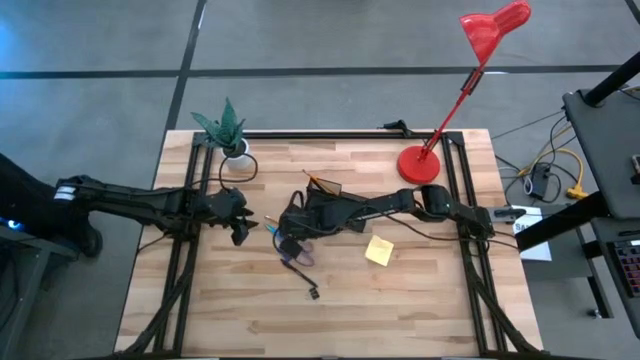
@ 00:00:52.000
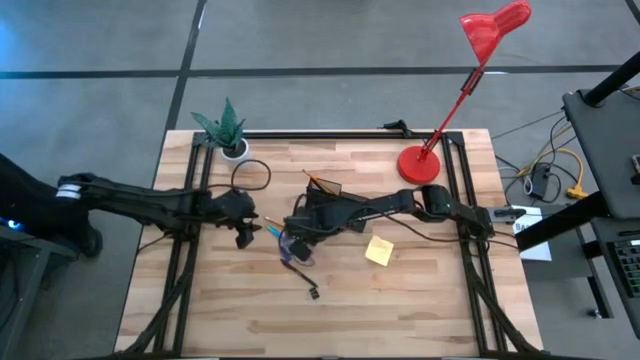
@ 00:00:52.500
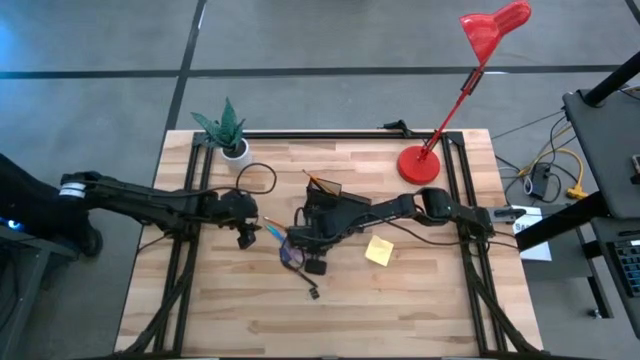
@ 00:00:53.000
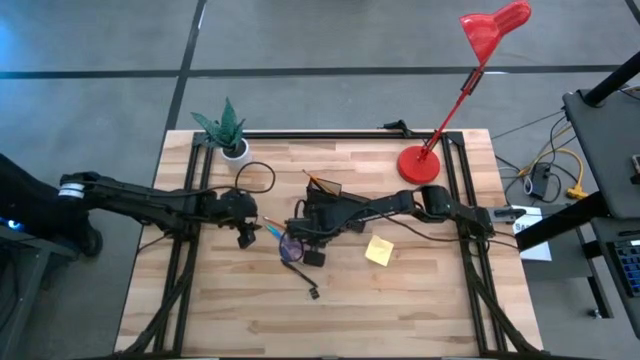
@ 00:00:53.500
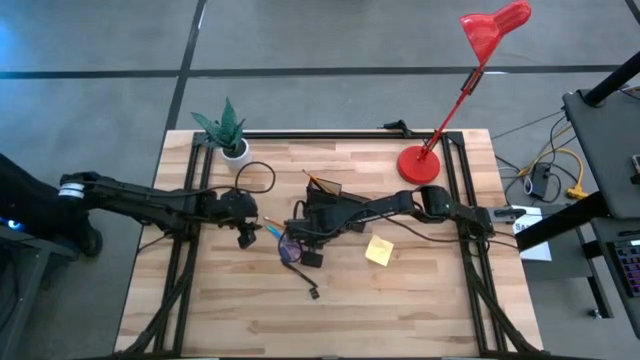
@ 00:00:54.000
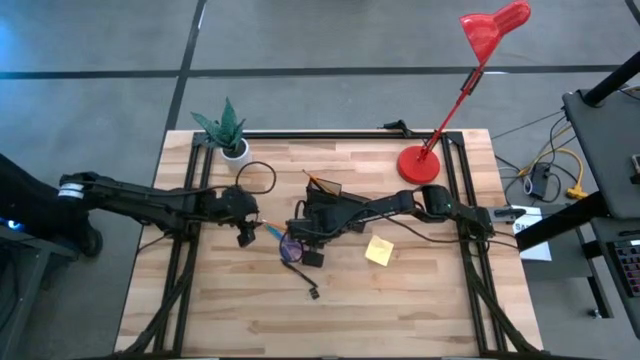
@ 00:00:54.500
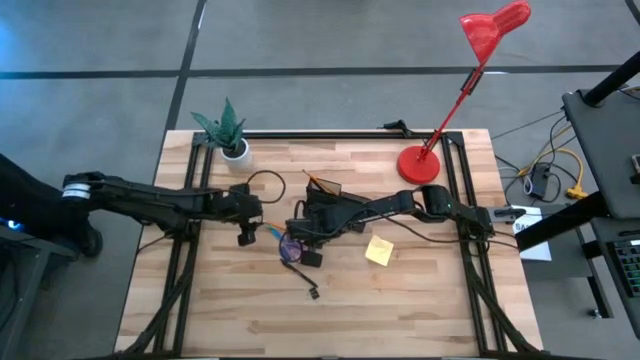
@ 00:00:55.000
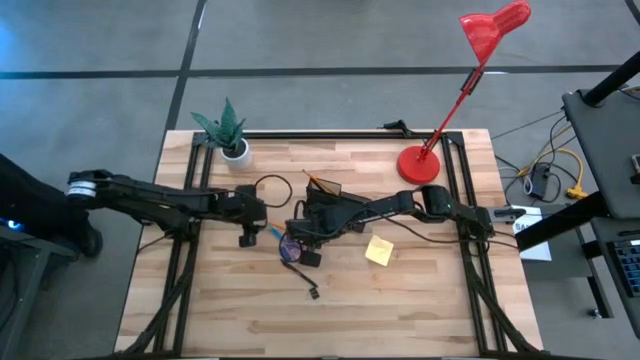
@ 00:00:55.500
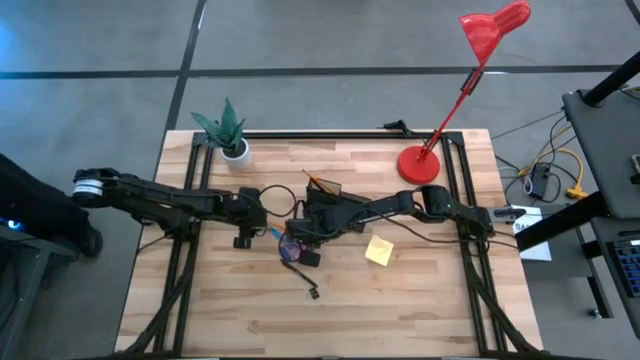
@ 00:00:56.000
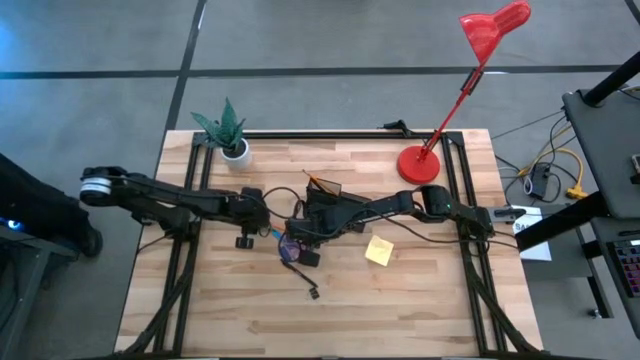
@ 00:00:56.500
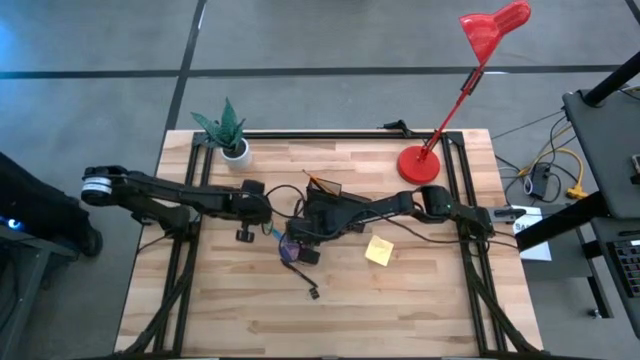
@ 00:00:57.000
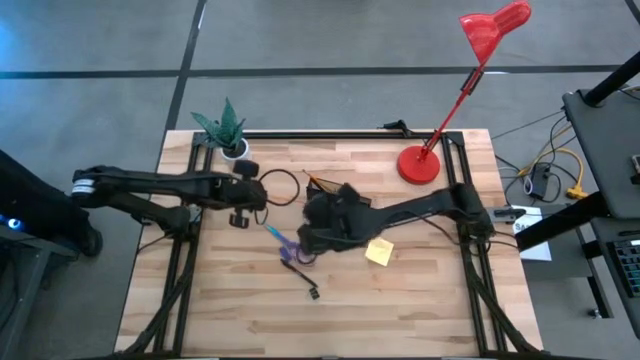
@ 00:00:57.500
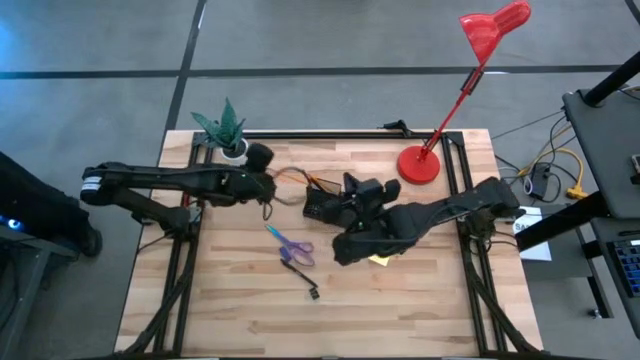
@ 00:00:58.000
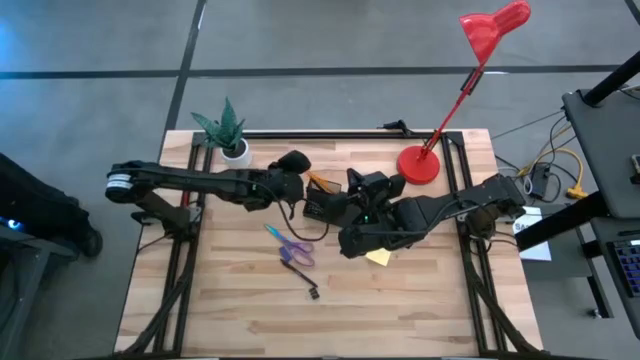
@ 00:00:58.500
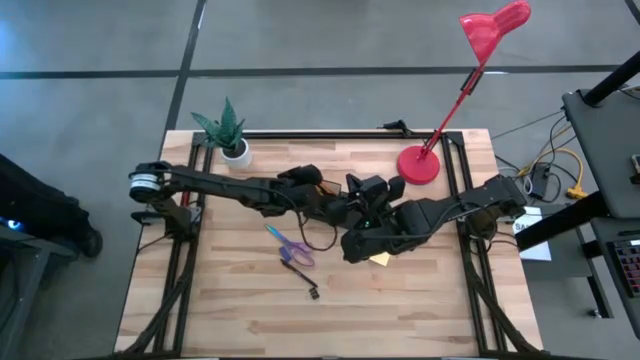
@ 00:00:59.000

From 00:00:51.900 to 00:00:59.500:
Task: Pick and place office supplies into organizer
Put the orange pencil into the desk organizer

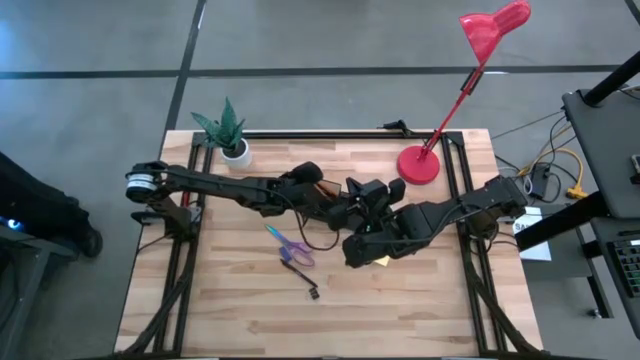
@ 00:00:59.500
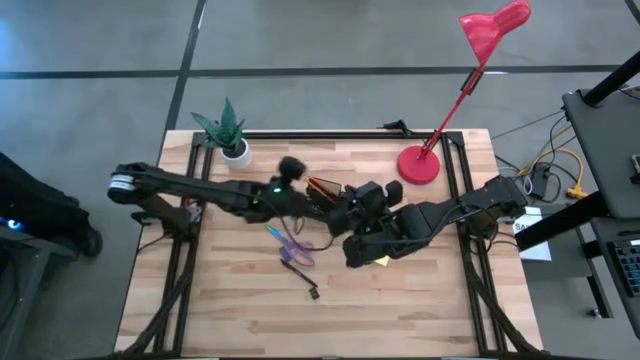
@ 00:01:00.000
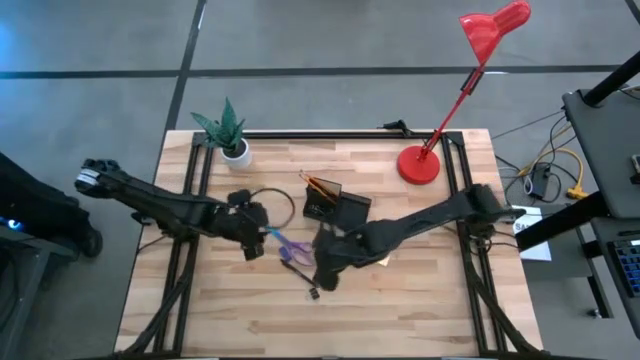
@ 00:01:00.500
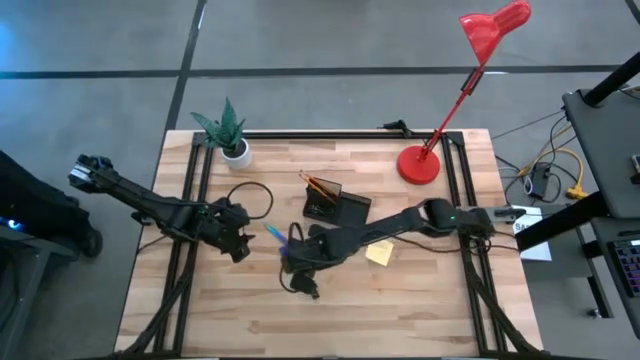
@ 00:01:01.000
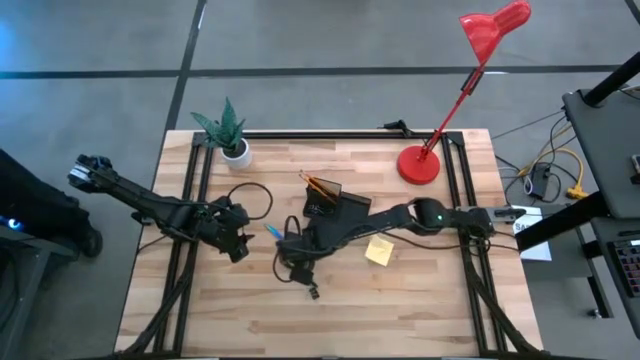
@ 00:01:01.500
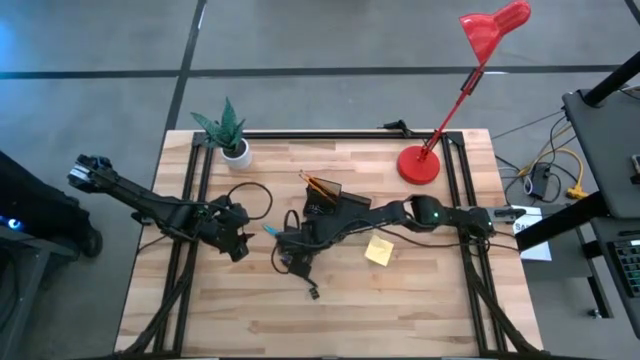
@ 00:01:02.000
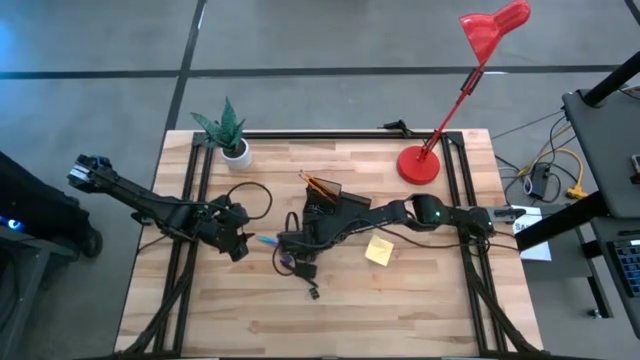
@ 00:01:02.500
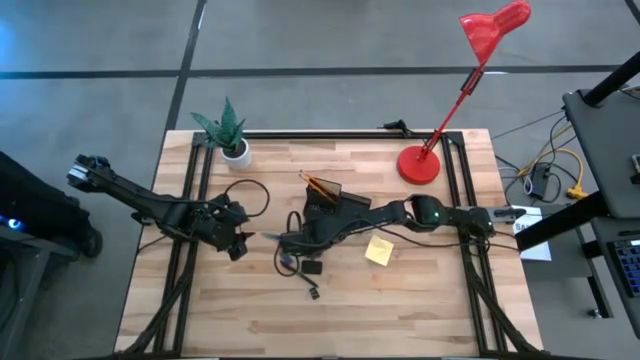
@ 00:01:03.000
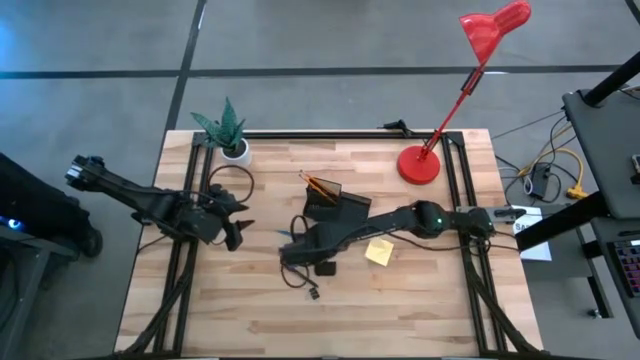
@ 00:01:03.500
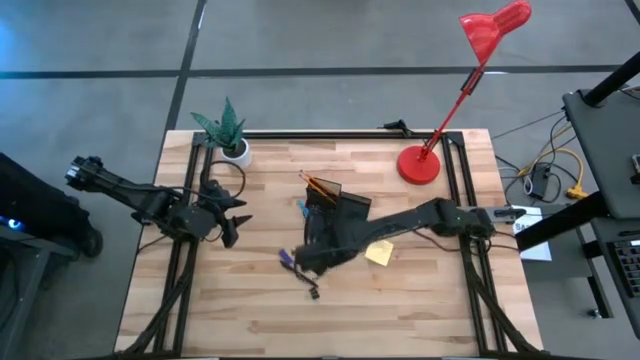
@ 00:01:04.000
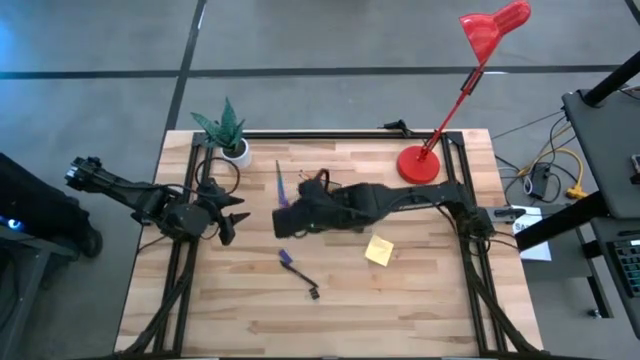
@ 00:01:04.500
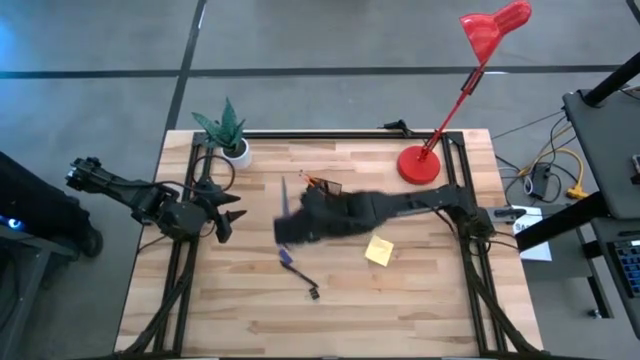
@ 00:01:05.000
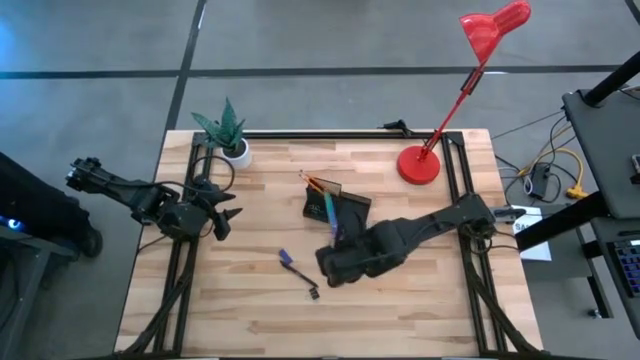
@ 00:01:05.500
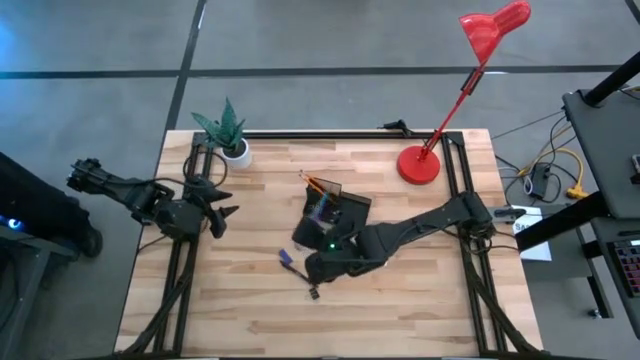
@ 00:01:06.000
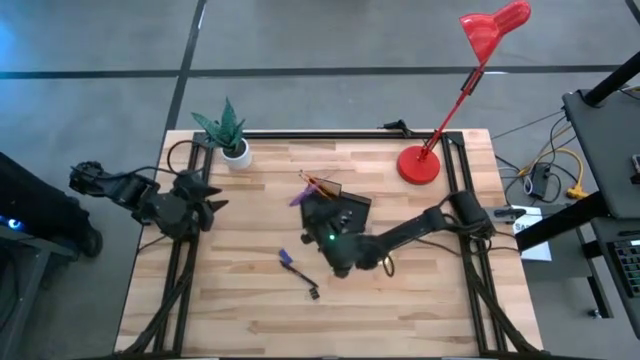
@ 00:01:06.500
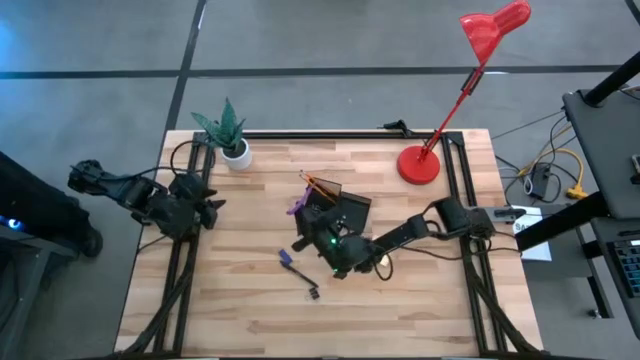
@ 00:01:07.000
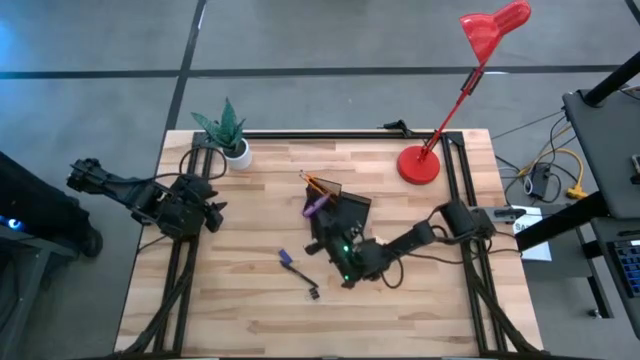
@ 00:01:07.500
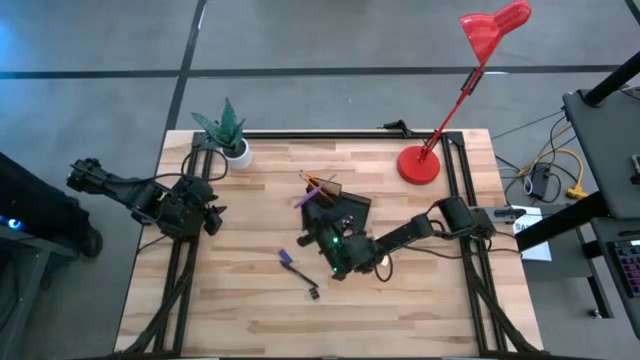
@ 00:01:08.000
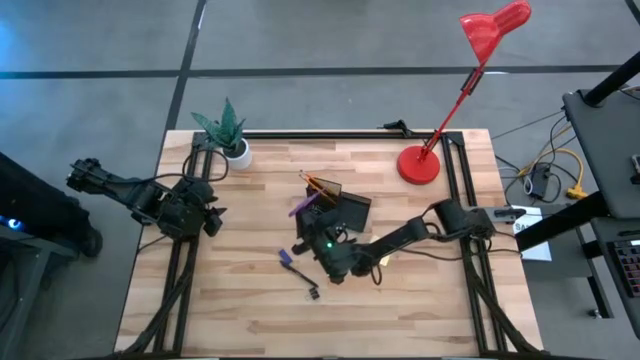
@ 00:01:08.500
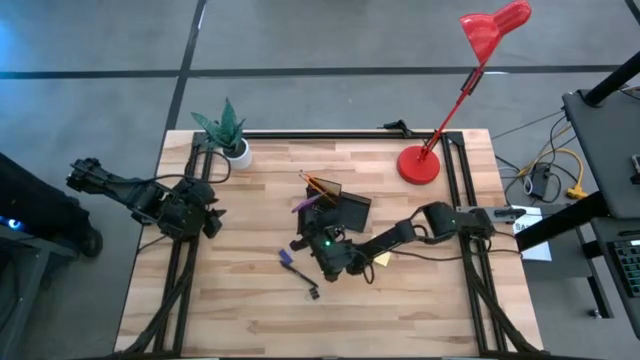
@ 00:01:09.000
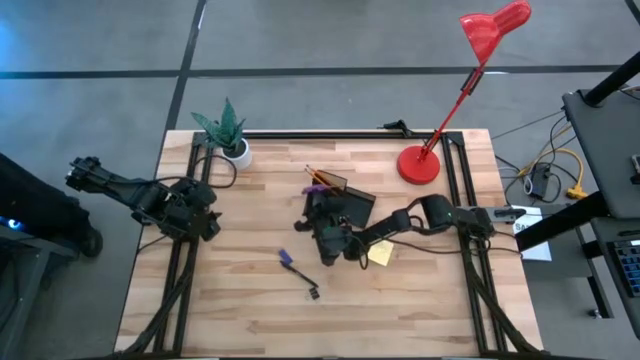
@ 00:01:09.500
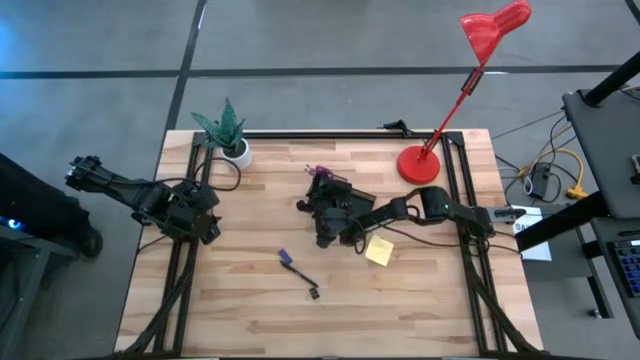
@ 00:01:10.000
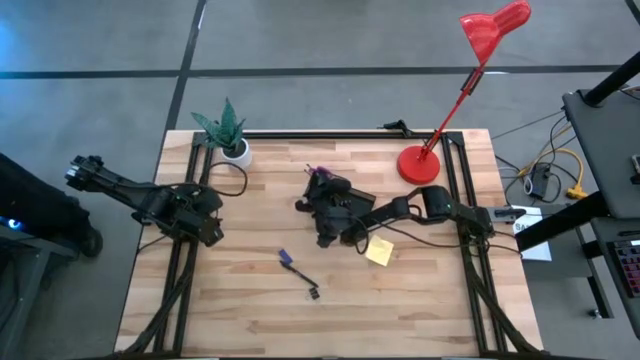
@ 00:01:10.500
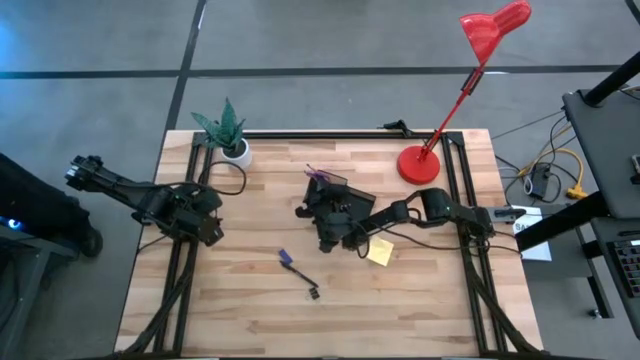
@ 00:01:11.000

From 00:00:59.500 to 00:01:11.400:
Put the purple scissors into the desk organizer

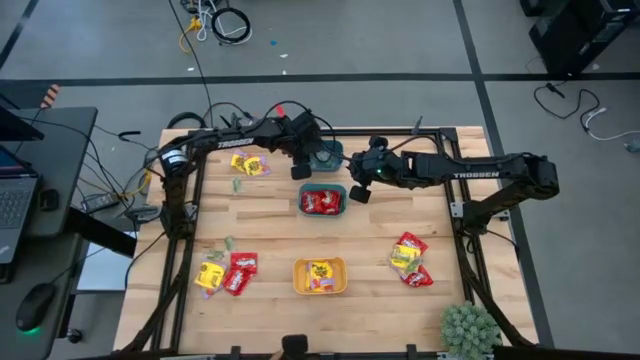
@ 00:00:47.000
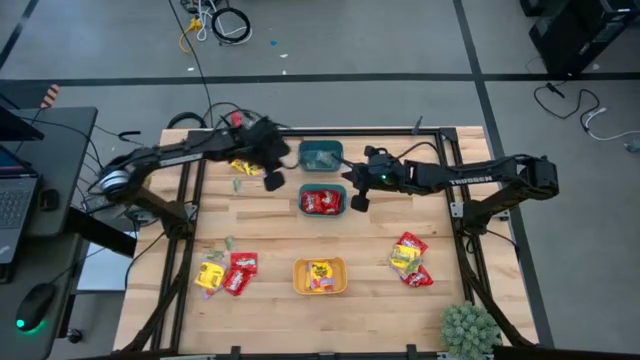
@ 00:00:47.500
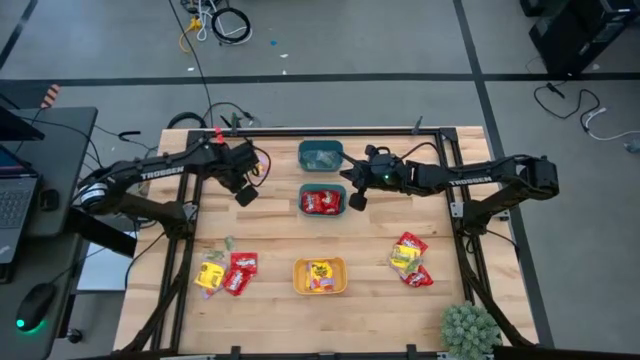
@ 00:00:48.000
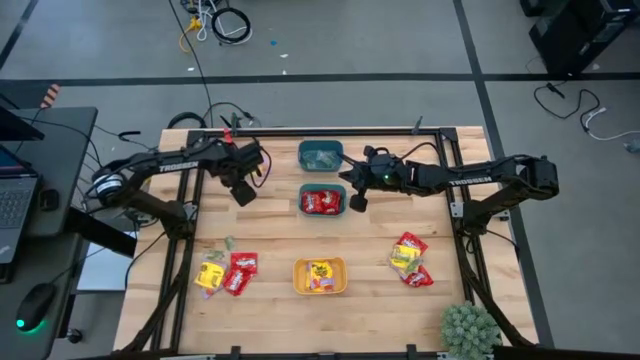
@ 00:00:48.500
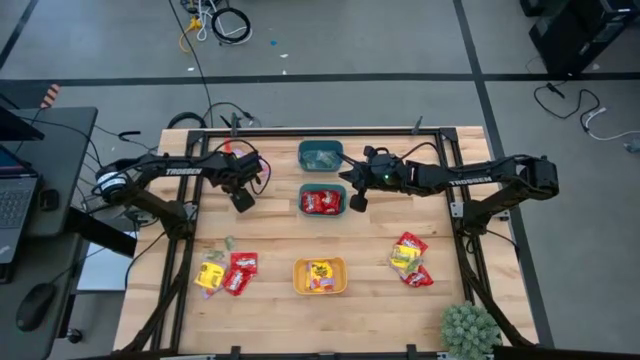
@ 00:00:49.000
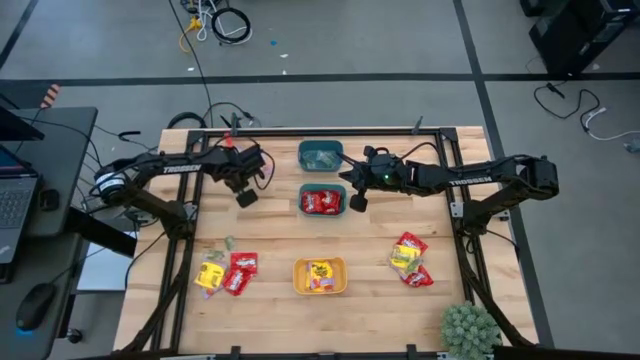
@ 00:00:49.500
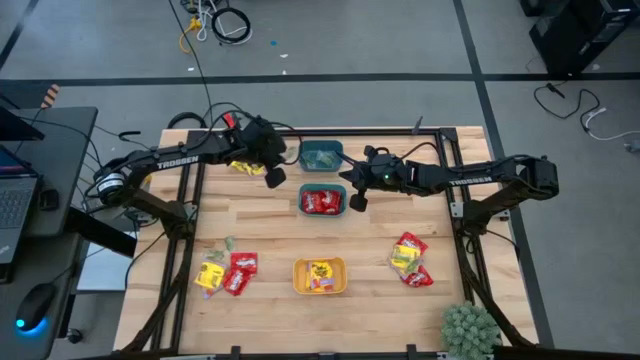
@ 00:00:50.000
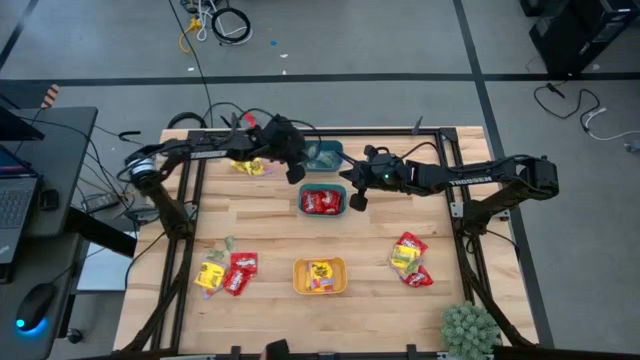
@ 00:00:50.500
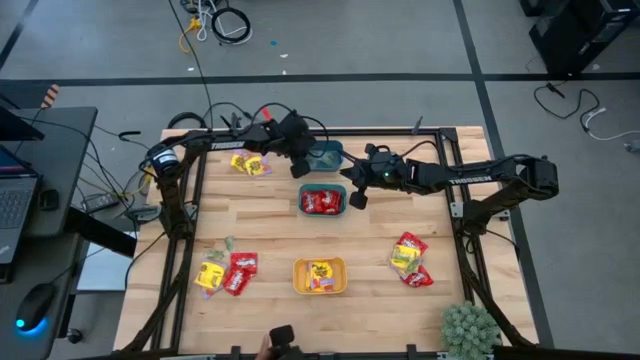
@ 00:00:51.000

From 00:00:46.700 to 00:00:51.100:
Task: Sort candy
Put the green gummy into the blue bin
